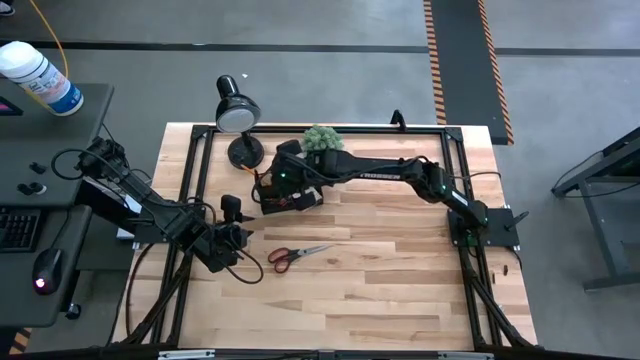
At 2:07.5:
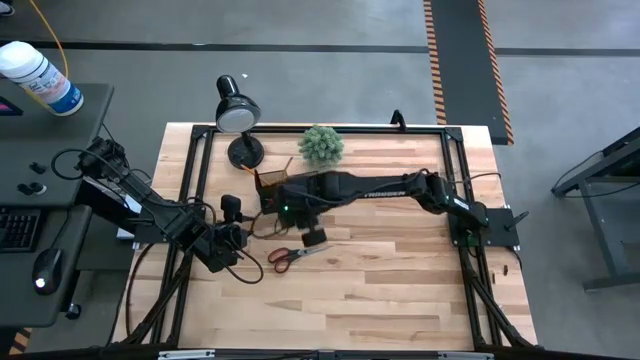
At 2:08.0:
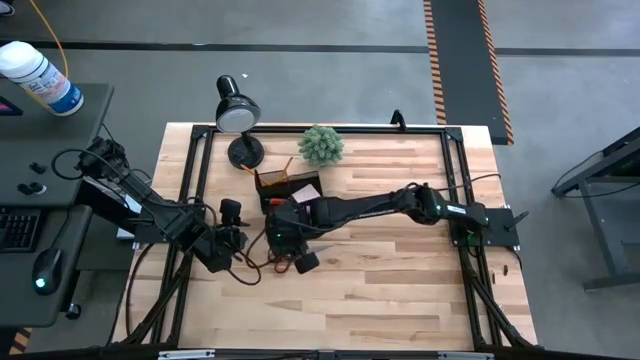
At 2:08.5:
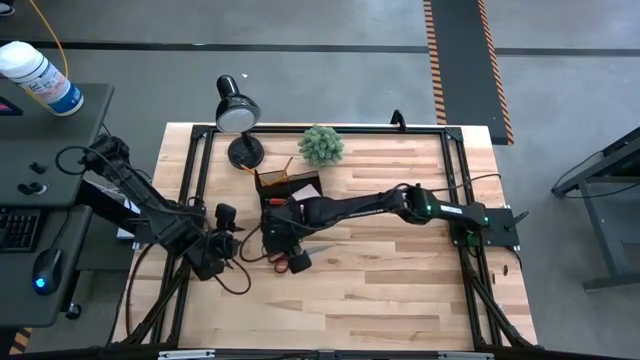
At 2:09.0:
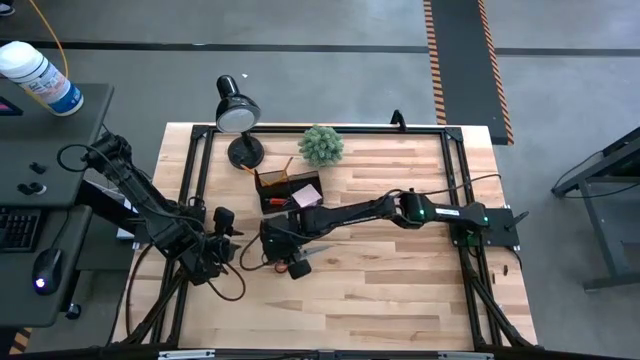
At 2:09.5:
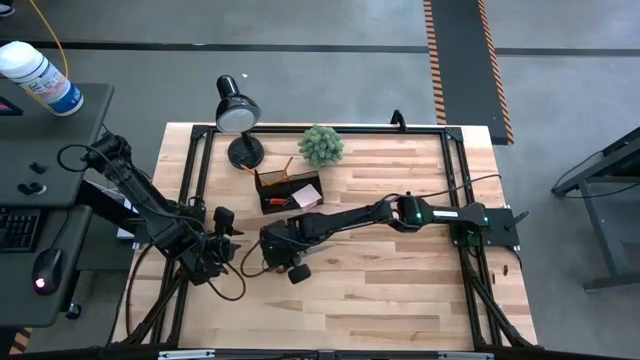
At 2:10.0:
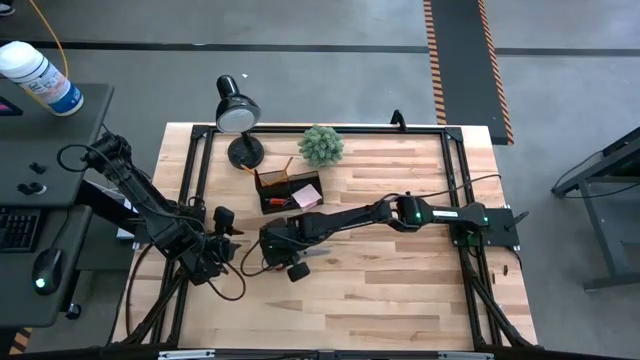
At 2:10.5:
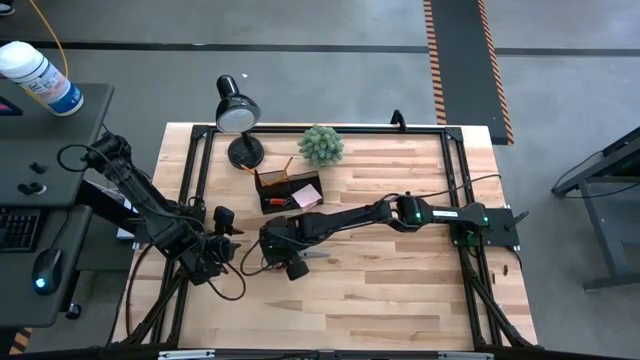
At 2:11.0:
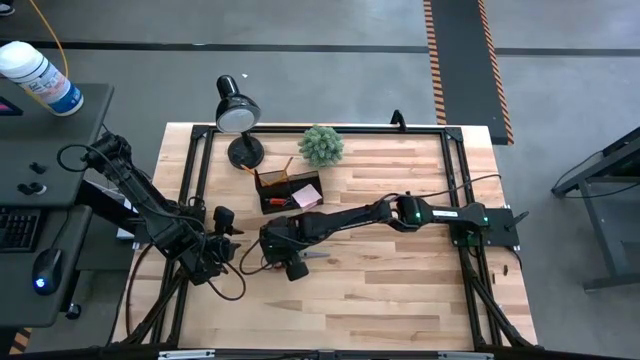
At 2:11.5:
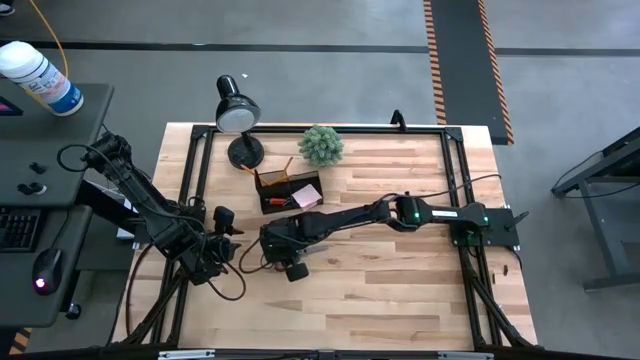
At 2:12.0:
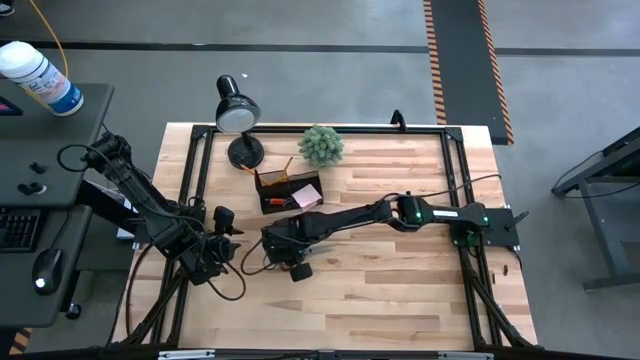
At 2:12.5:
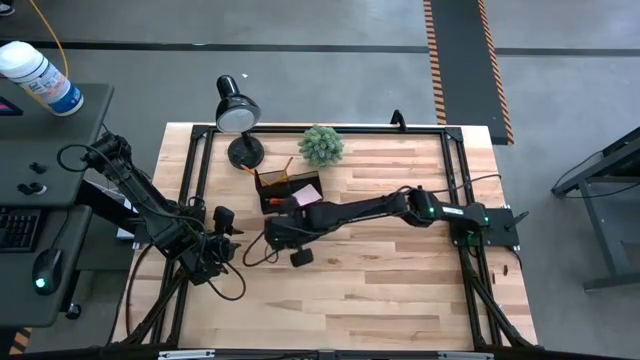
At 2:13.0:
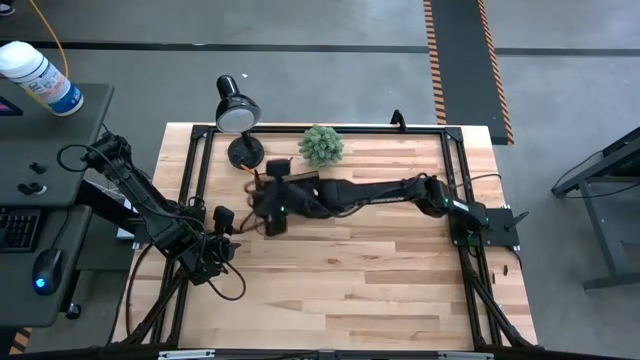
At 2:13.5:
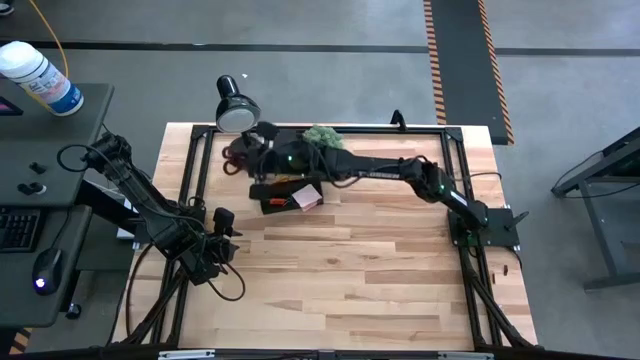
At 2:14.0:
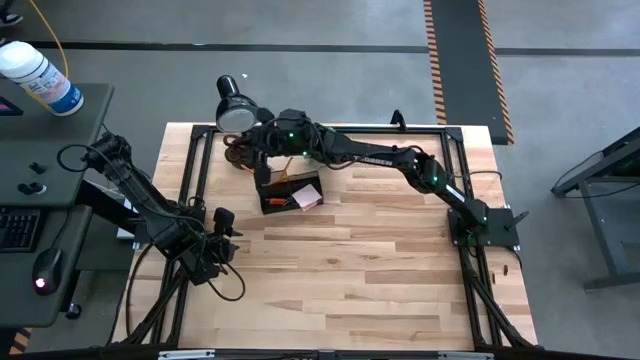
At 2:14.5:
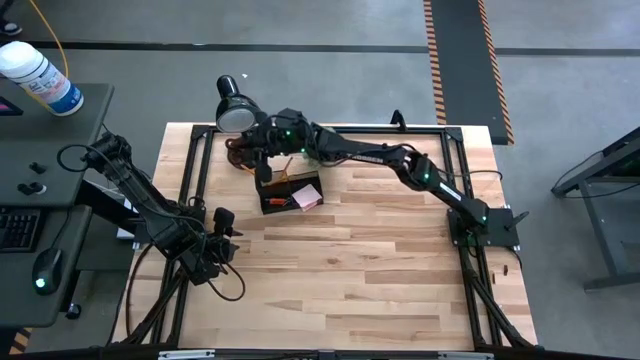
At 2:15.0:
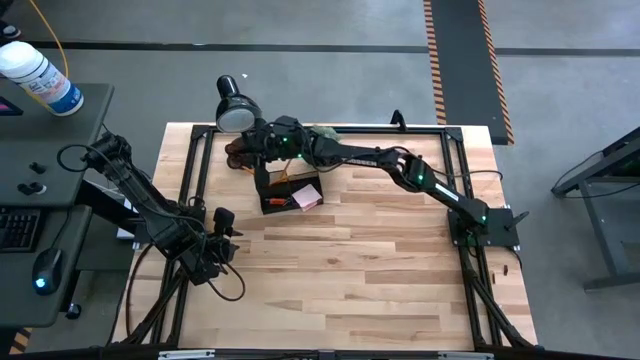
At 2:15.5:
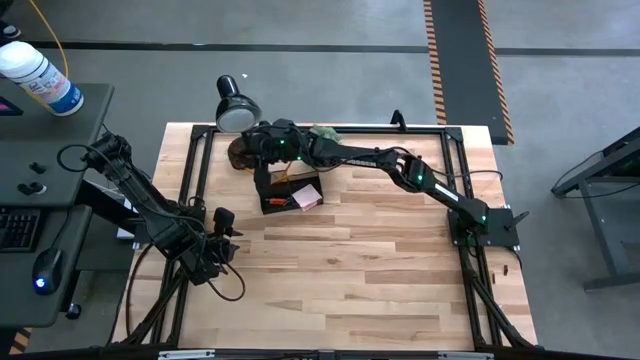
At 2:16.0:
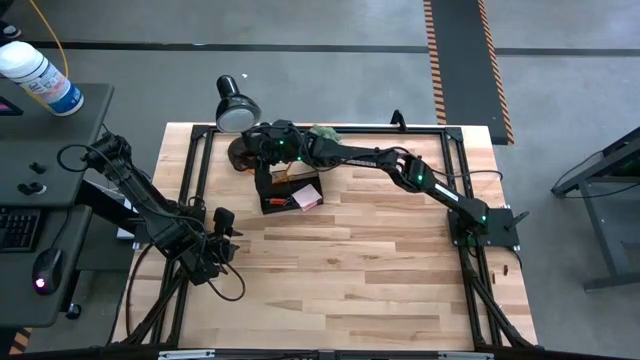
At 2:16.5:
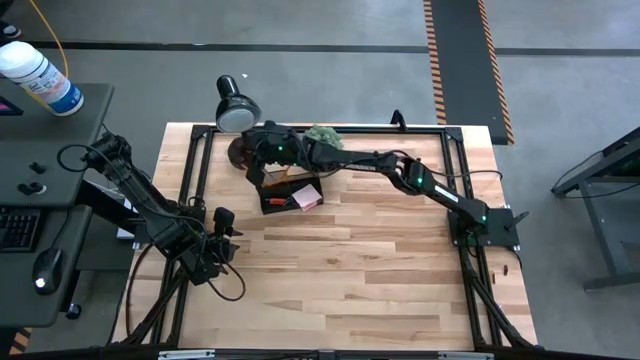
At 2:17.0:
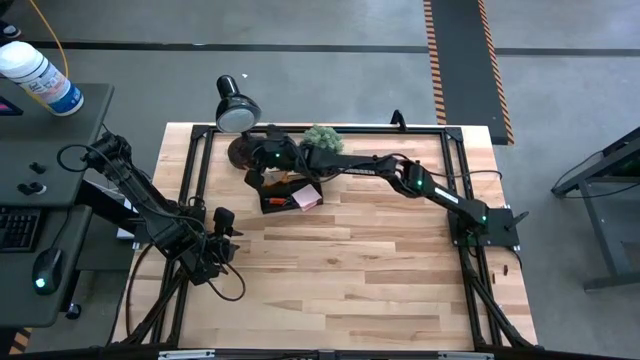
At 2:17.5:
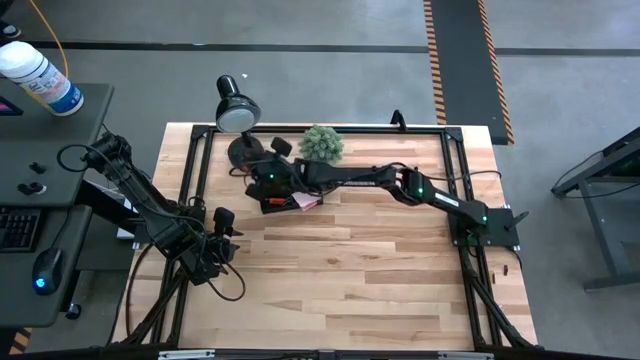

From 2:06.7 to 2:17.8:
Task: Pick and place office supplies into organizer
Put the scissors into the desktop organizer

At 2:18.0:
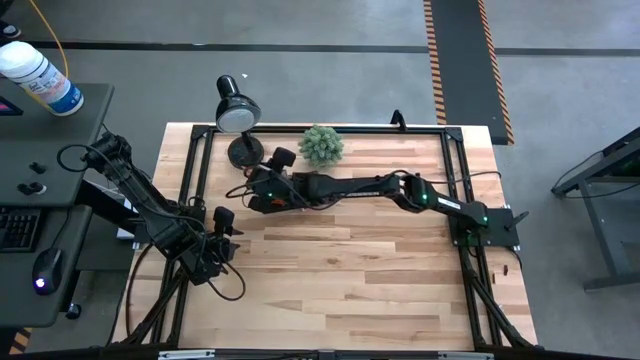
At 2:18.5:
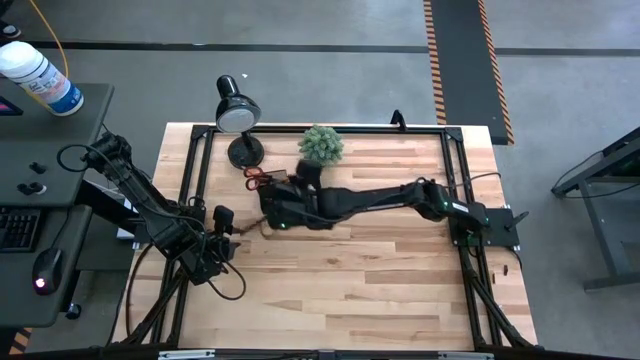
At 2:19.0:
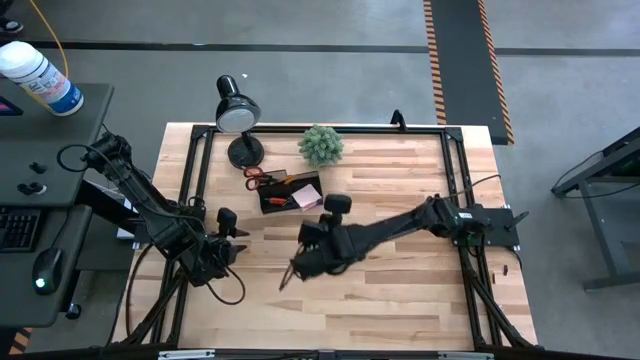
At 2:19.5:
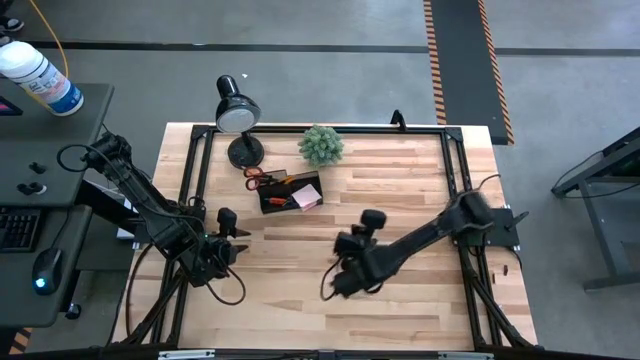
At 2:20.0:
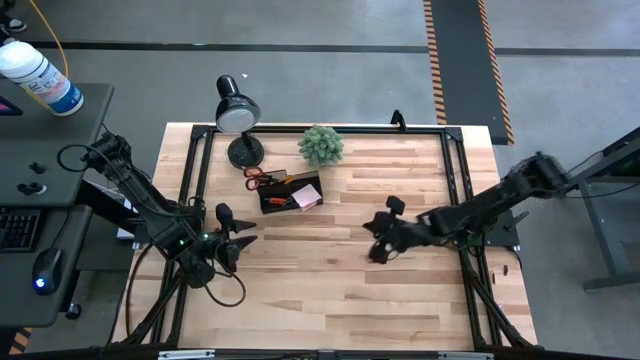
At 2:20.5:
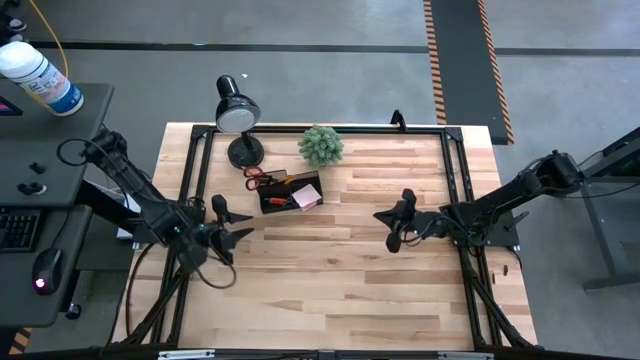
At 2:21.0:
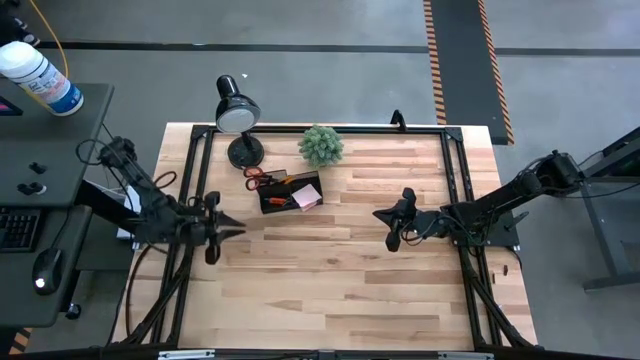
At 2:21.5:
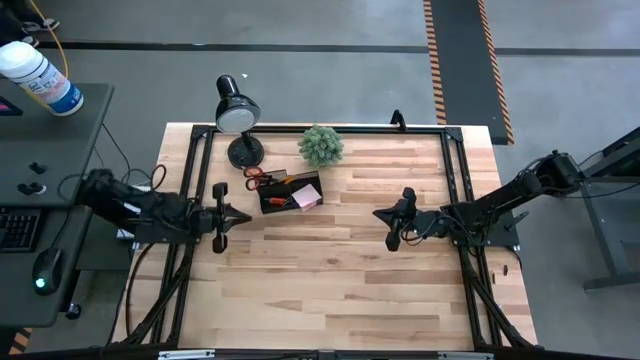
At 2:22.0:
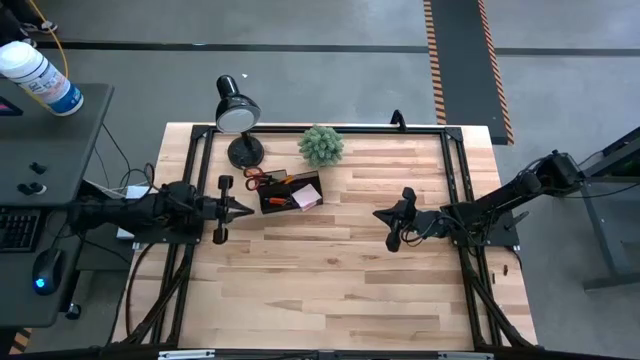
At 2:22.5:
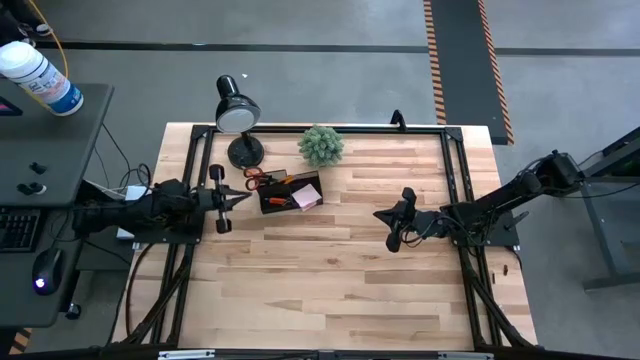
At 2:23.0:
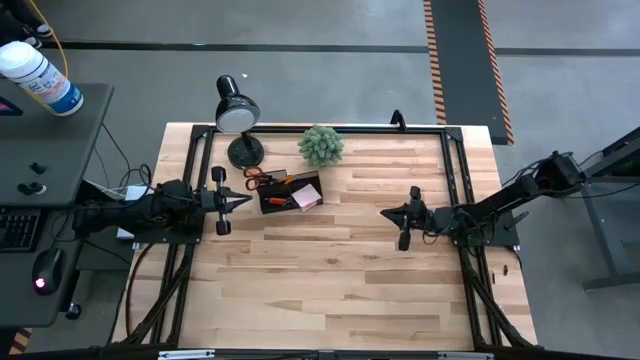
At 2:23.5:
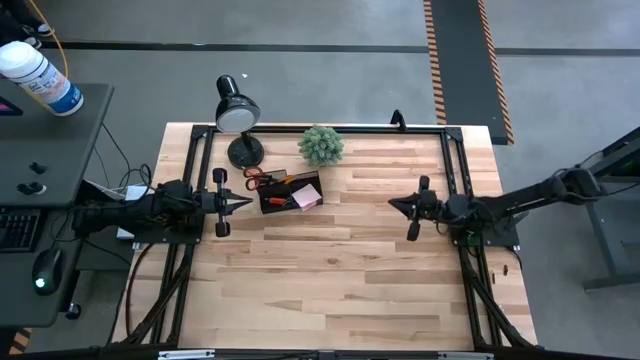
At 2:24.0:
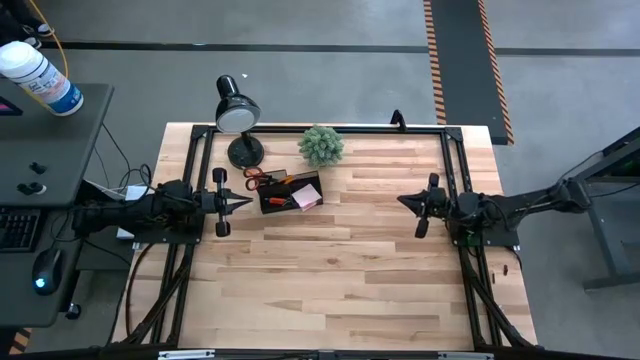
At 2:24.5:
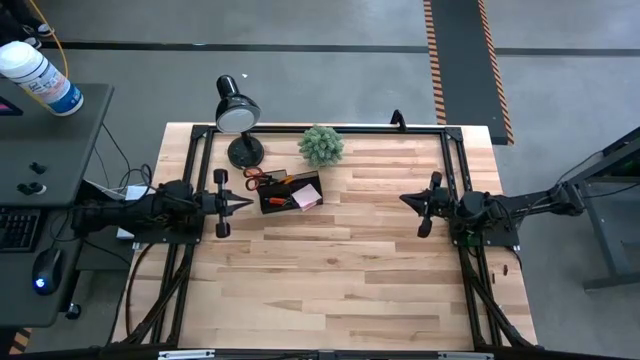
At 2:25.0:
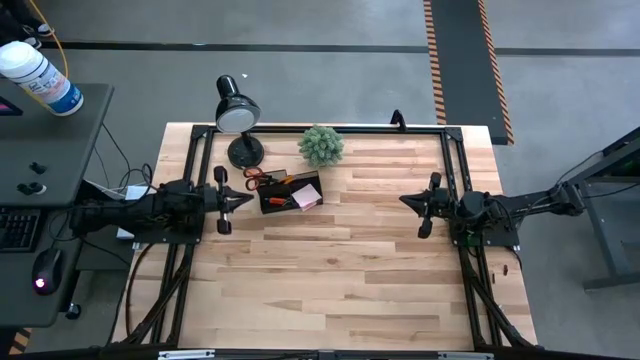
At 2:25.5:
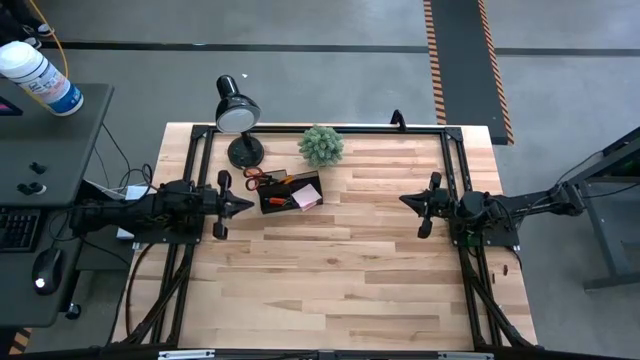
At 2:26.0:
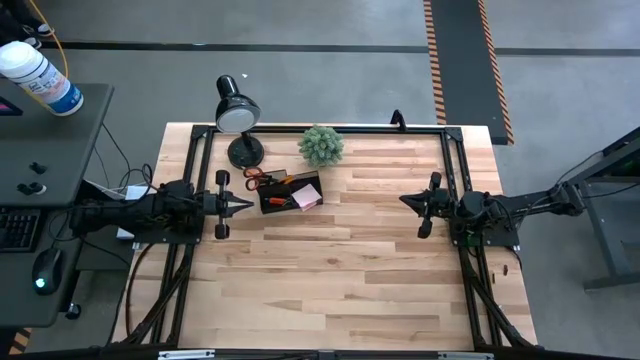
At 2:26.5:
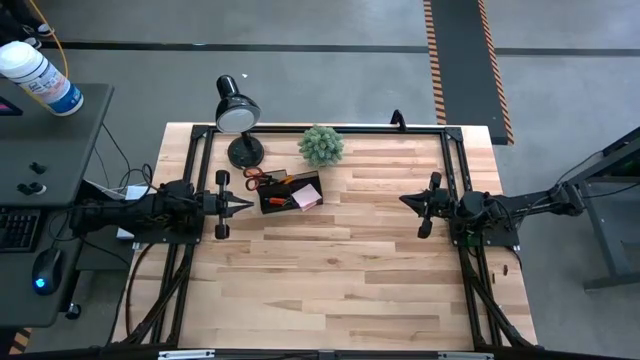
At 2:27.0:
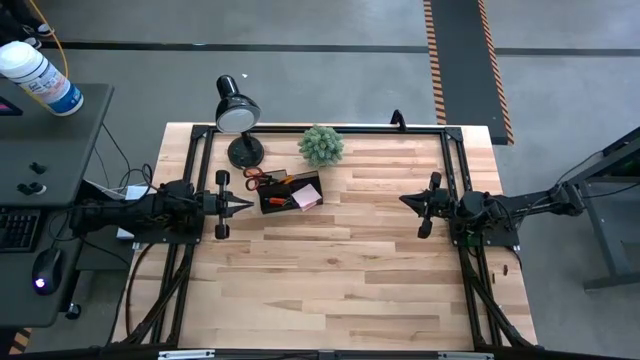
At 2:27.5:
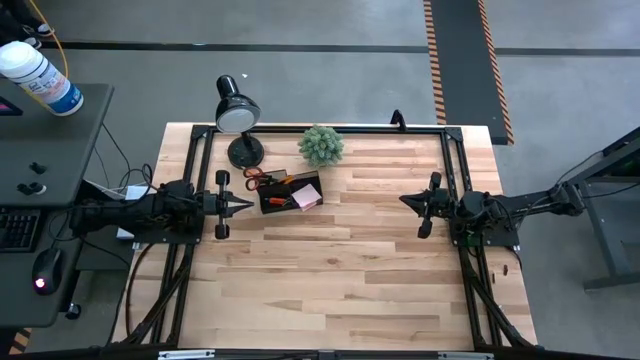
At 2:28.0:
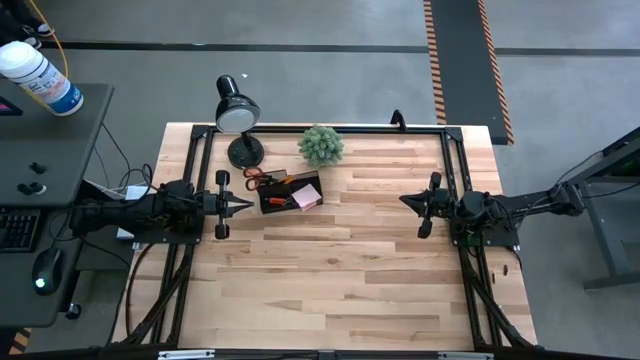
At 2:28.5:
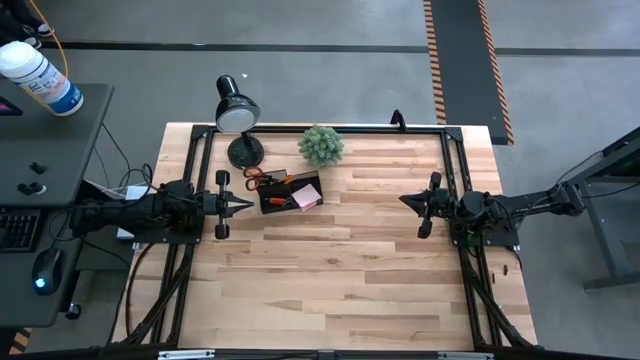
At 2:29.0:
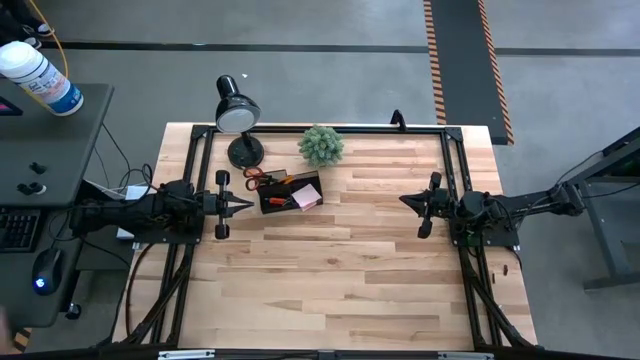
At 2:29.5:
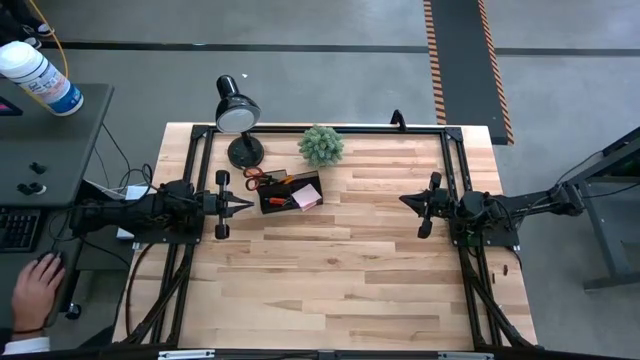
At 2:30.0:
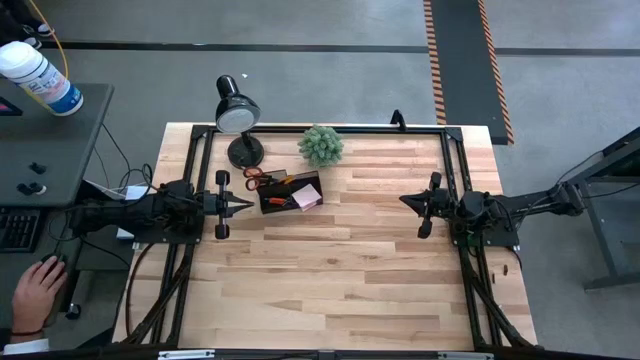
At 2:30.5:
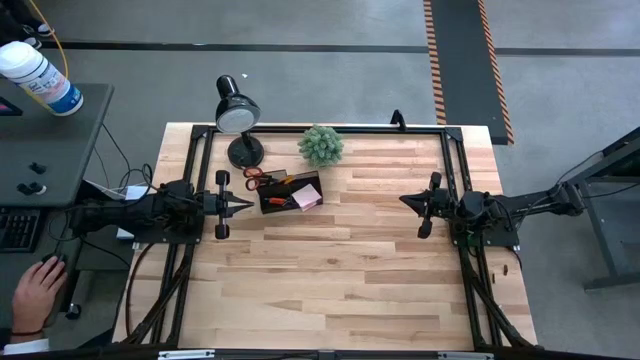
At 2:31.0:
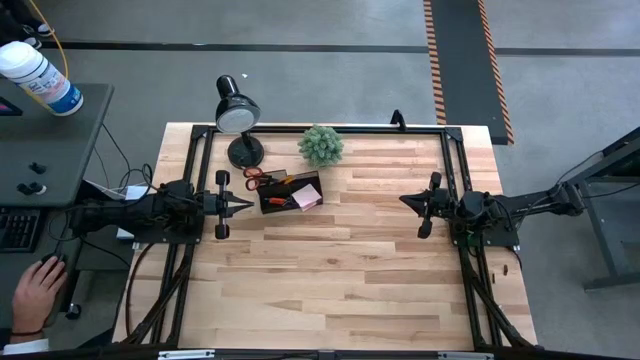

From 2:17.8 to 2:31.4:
Return to Home Position
